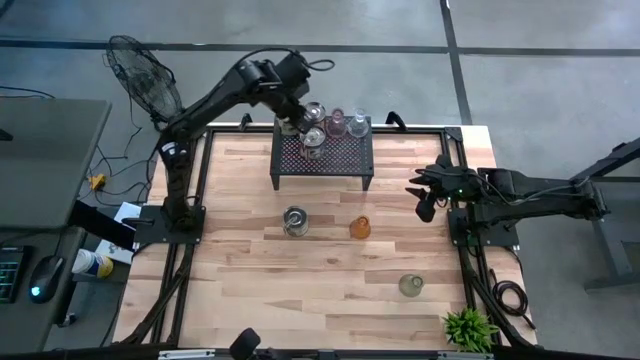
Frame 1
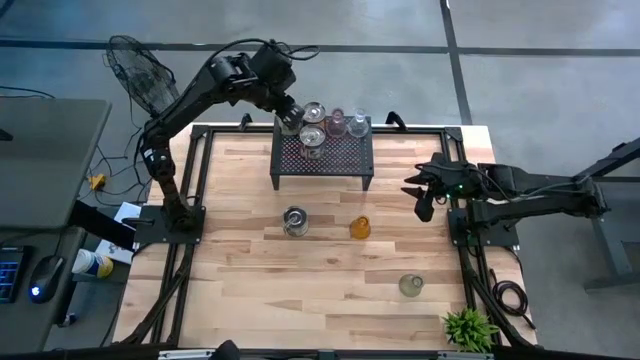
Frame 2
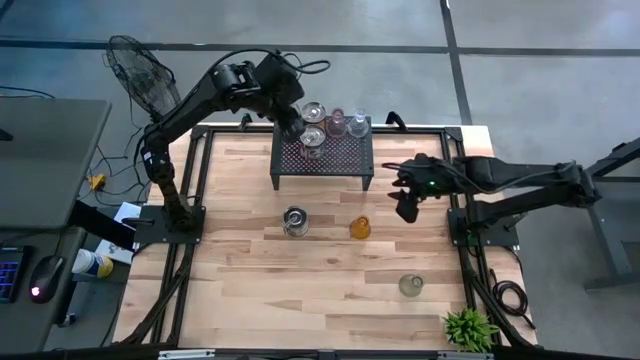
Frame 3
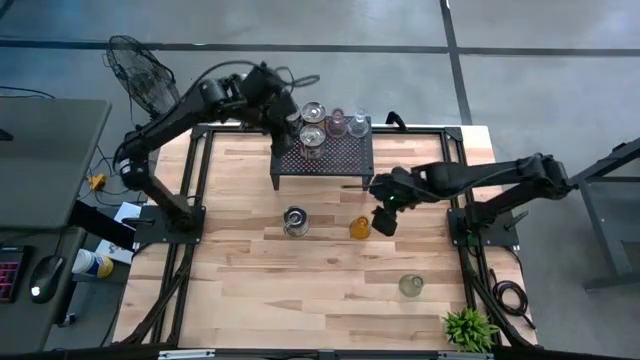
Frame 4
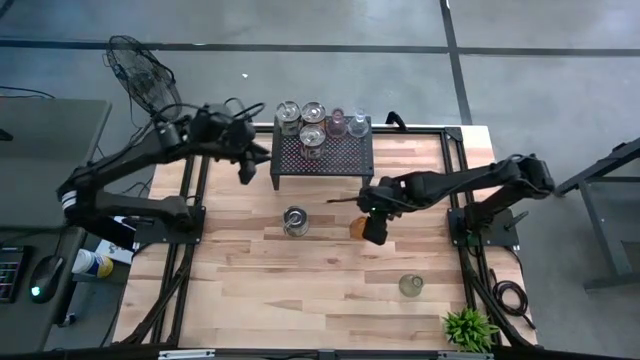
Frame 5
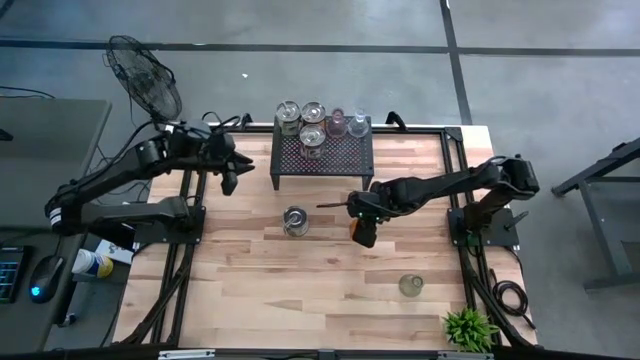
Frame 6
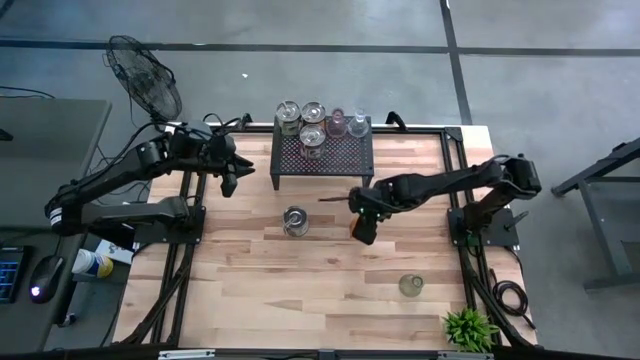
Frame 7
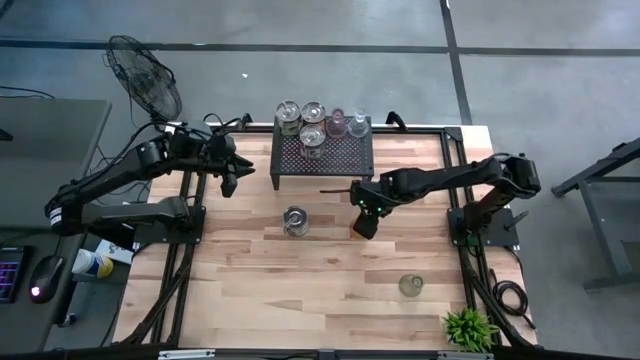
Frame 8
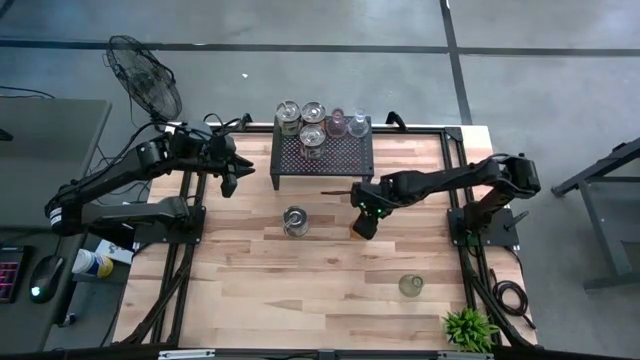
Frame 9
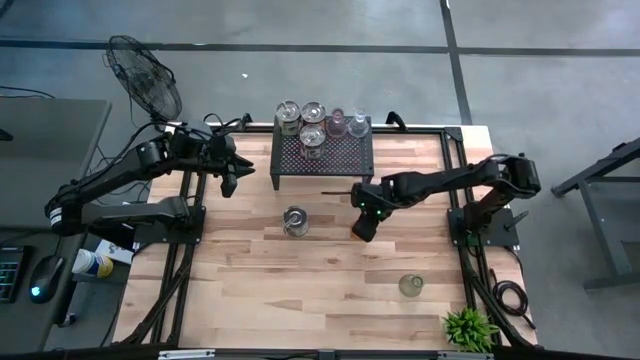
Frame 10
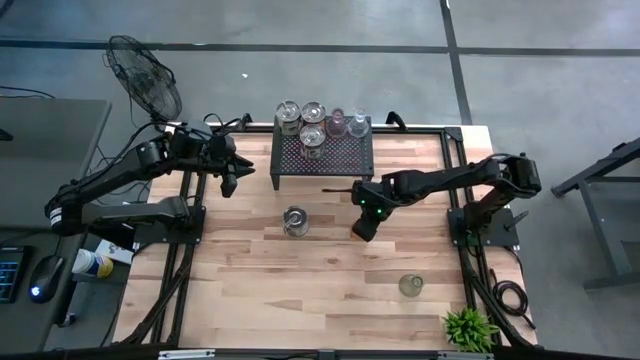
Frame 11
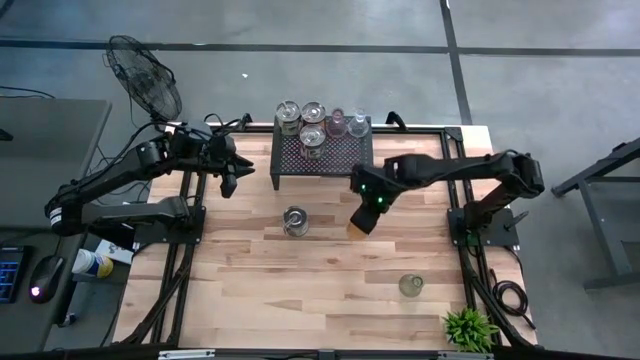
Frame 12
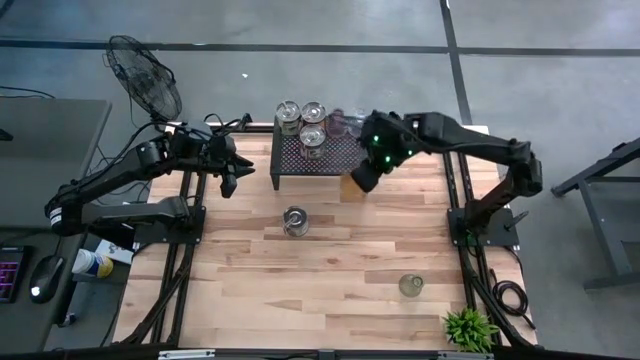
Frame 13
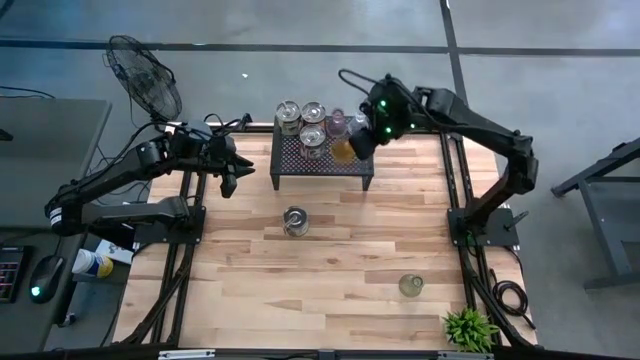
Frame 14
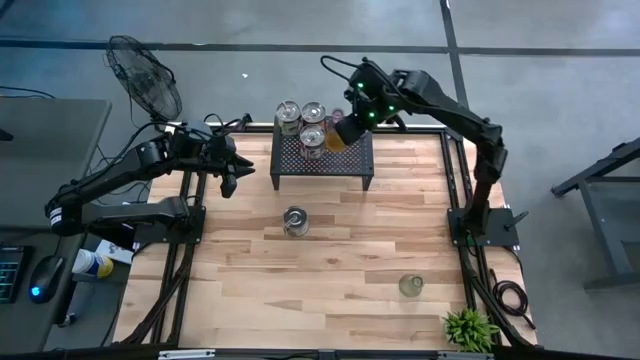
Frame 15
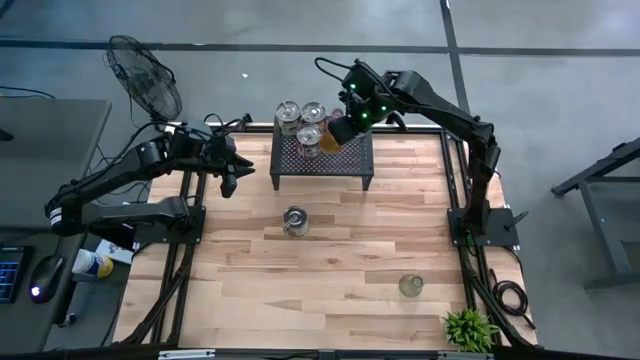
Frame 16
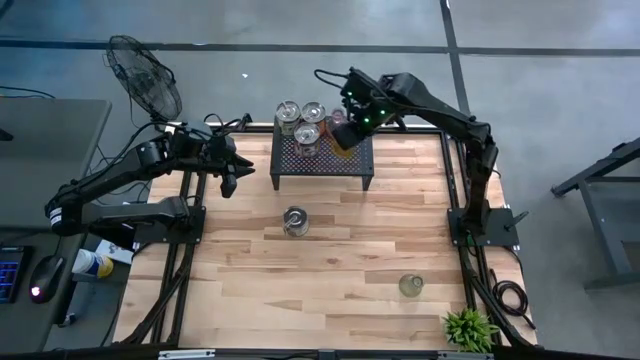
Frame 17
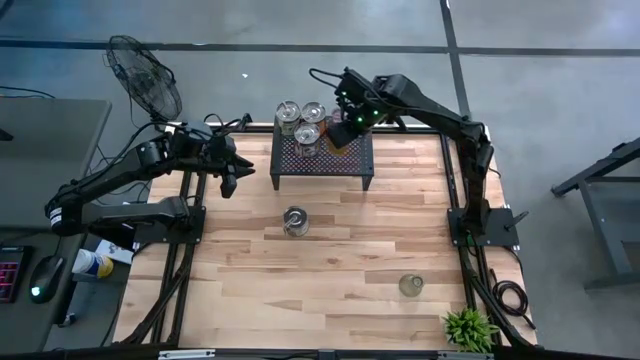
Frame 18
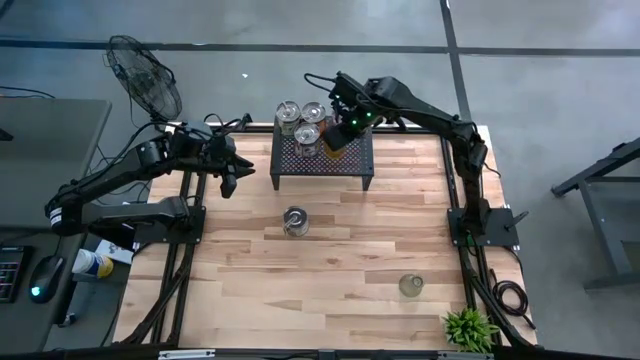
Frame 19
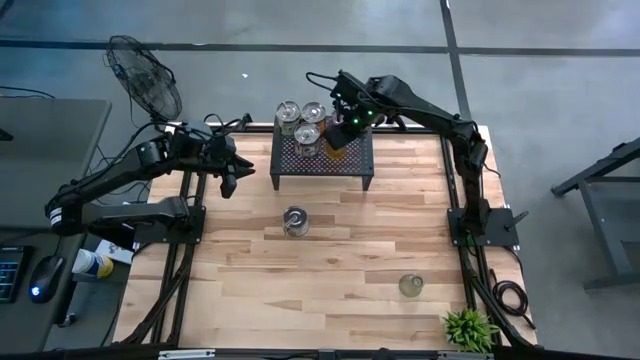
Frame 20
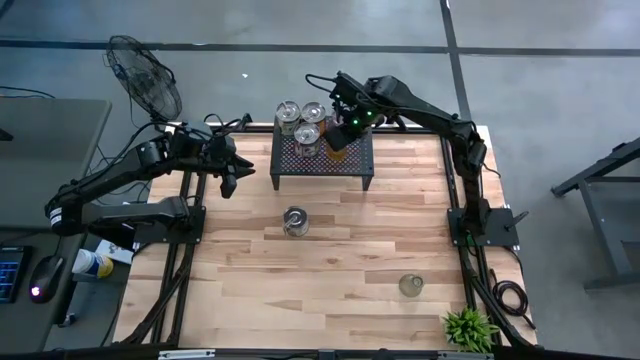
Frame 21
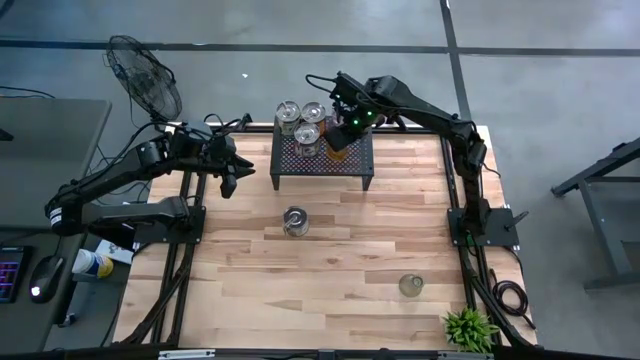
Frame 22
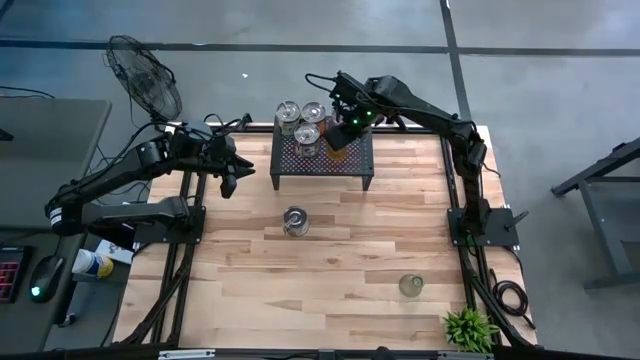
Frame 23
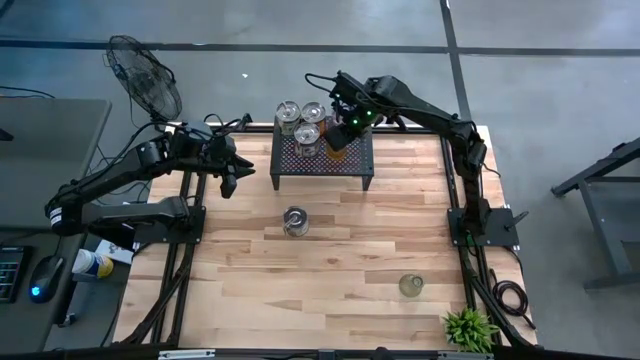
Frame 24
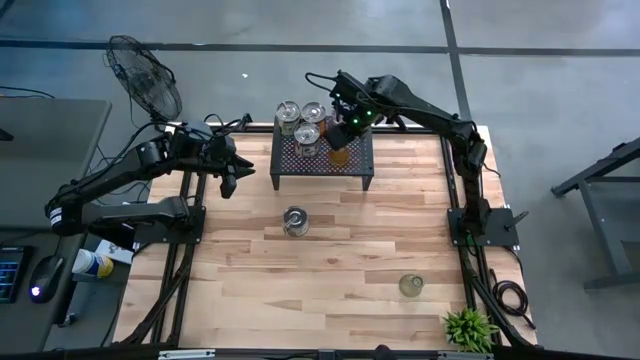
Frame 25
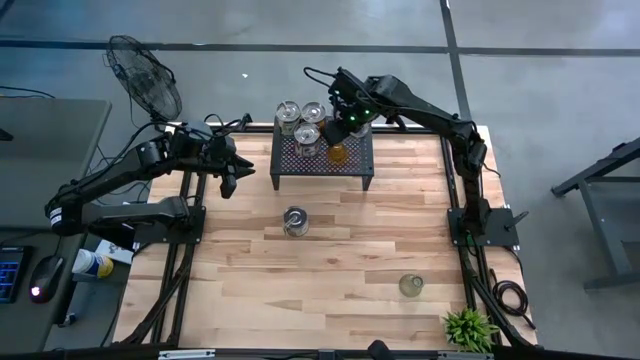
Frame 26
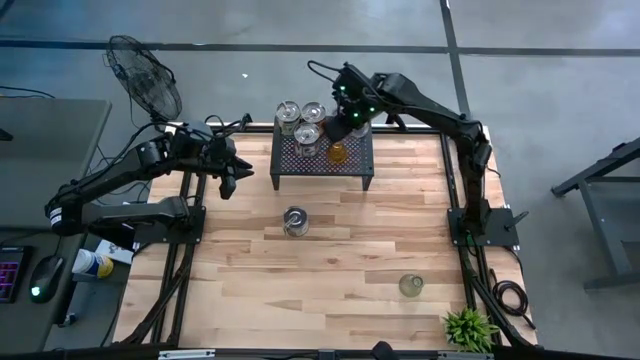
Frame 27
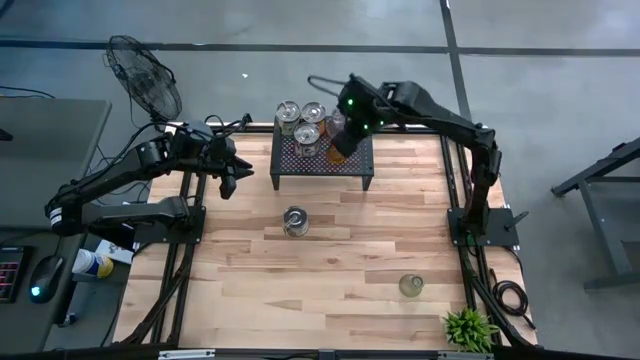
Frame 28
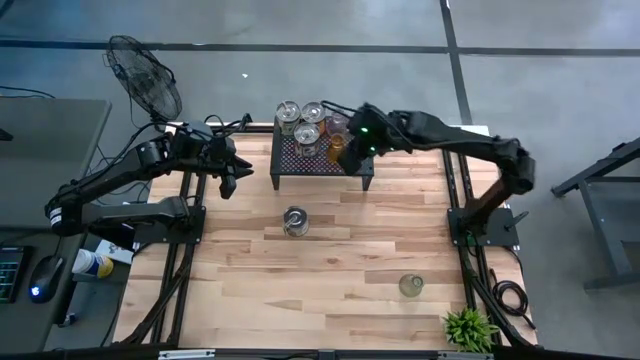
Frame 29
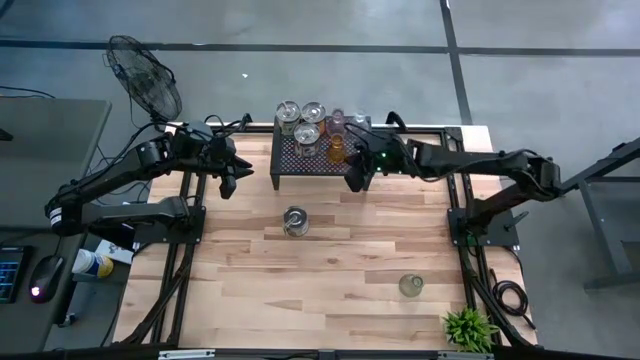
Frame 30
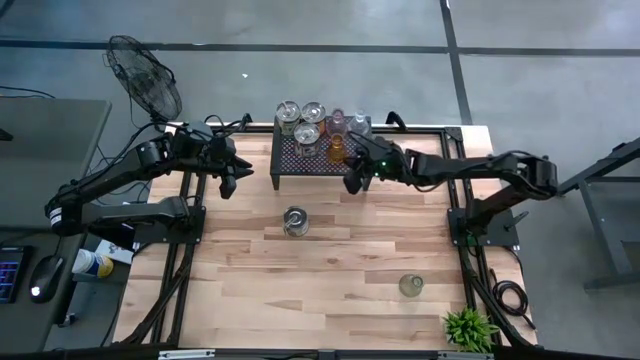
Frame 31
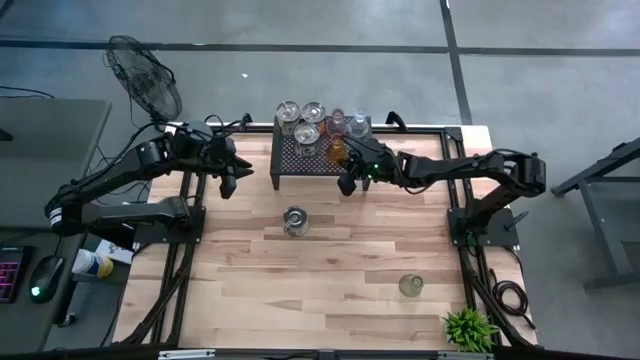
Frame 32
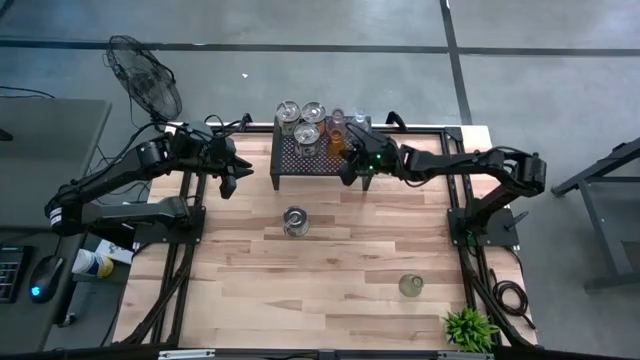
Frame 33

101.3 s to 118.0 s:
Task: Pick & Place candle stick holders
Put the yellow candle holder on the shelf

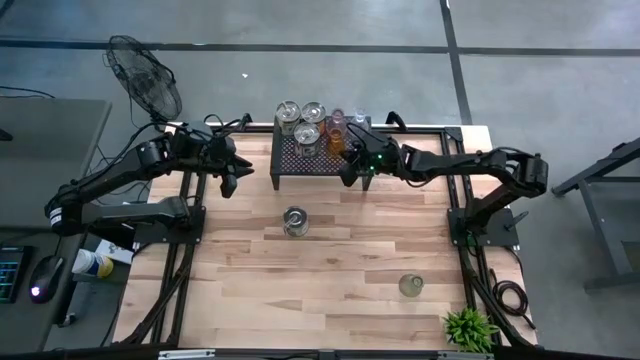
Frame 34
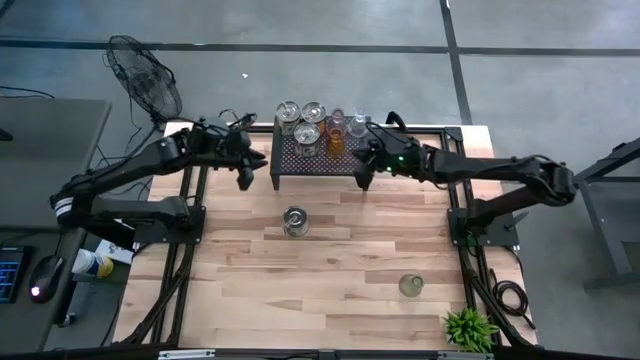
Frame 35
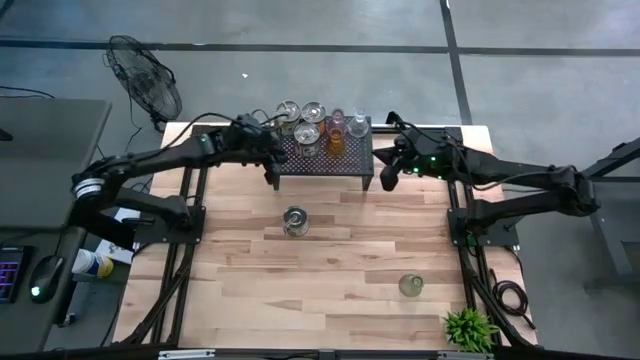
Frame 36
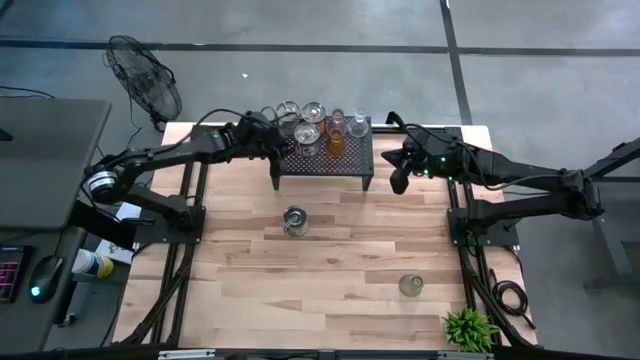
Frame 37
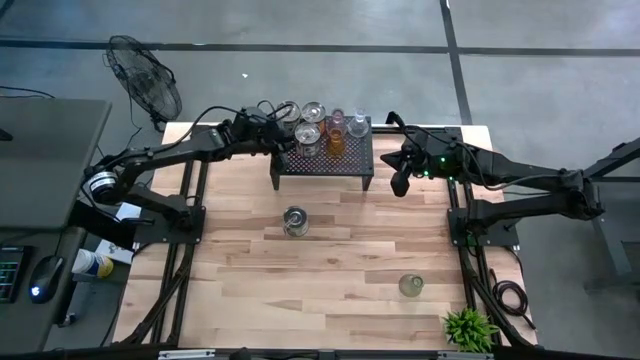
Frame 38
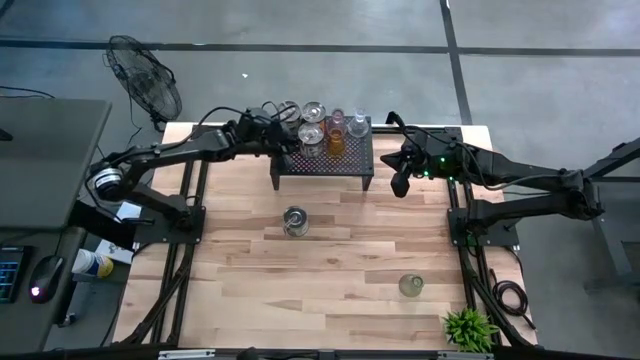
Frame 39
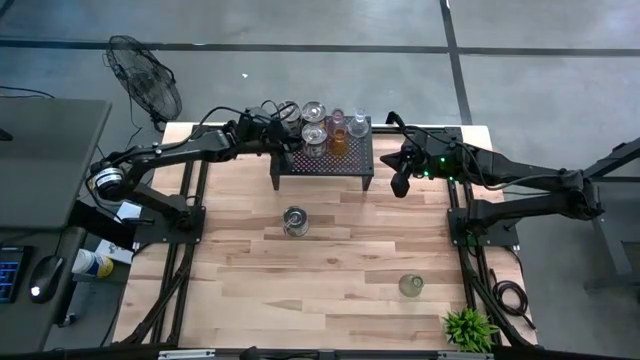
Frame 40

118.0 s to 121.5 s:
Adjust the silver scented candle can on the shelf

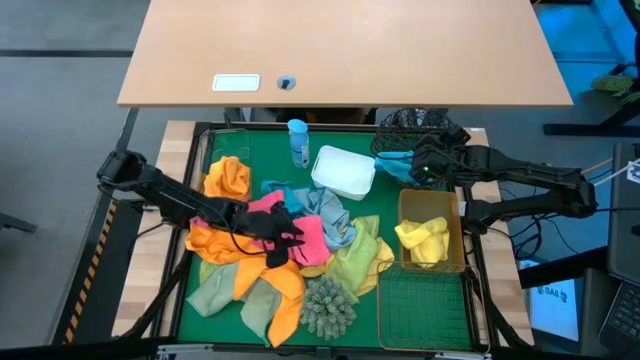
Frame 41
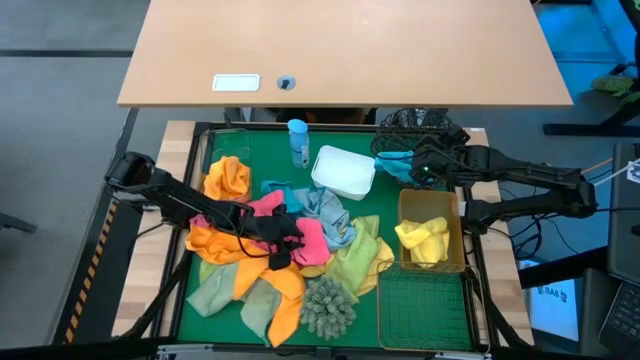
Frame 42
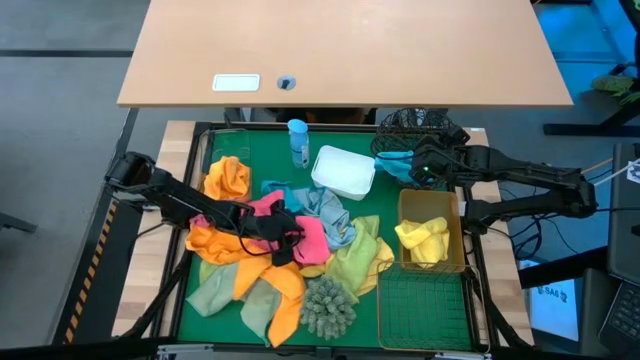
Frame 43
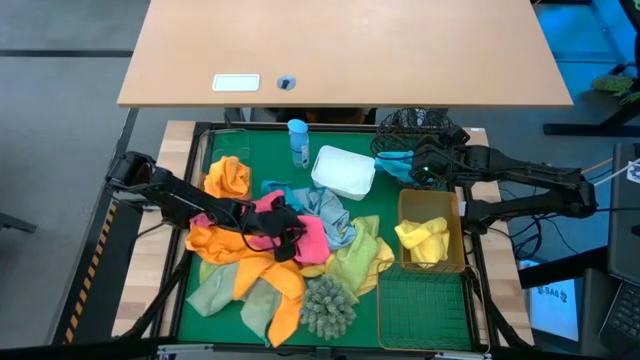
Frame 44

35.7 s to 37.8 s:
Task: Sort microfiber towel by color & place in baskets
Put the pink microfiber towel into the white bin
